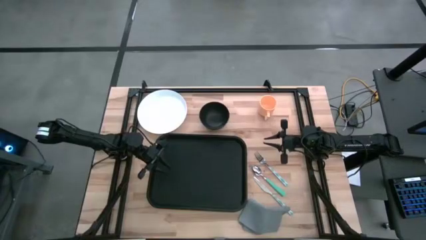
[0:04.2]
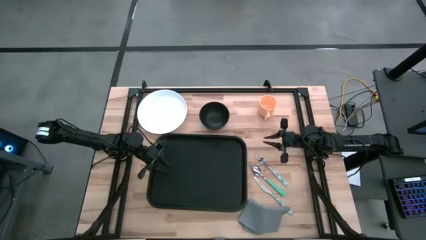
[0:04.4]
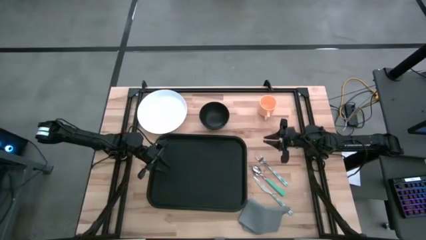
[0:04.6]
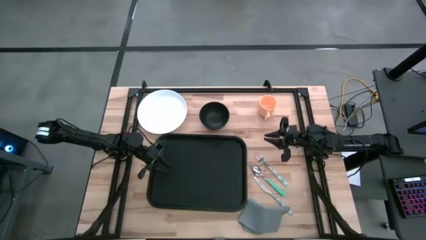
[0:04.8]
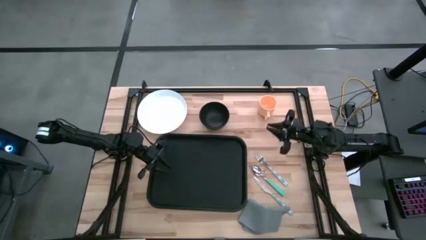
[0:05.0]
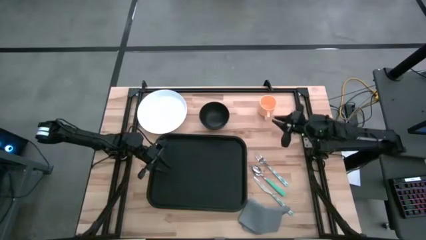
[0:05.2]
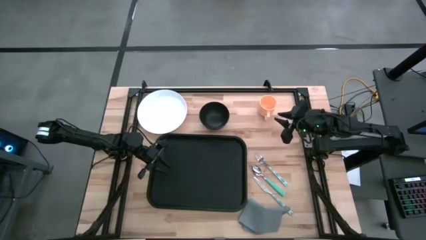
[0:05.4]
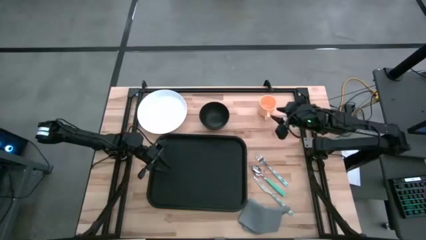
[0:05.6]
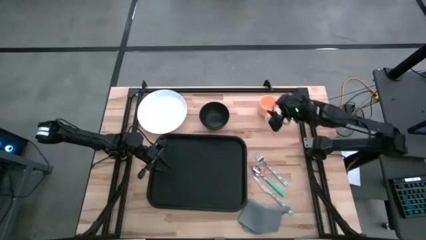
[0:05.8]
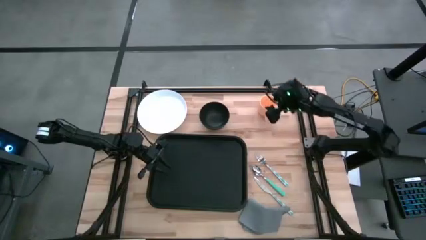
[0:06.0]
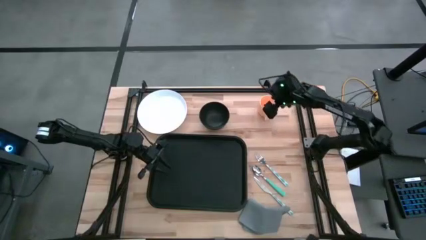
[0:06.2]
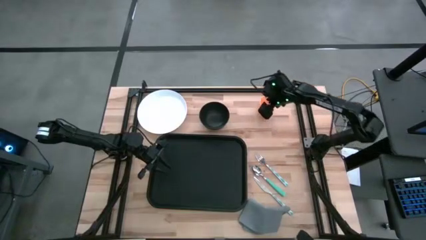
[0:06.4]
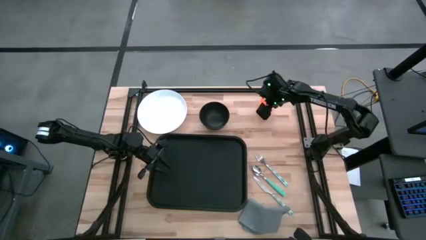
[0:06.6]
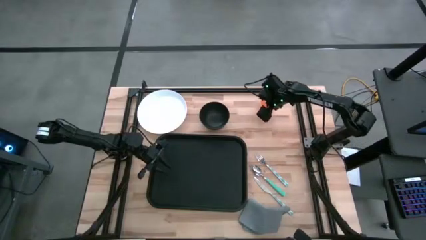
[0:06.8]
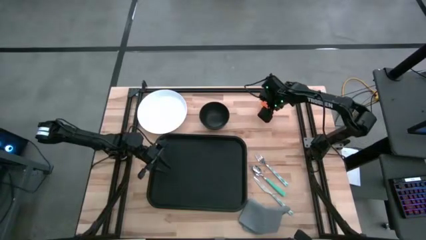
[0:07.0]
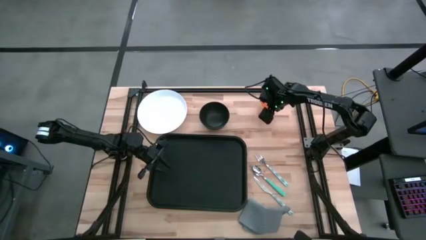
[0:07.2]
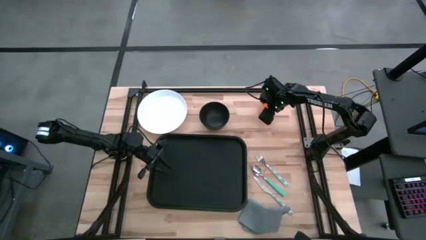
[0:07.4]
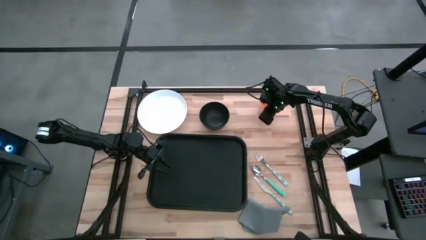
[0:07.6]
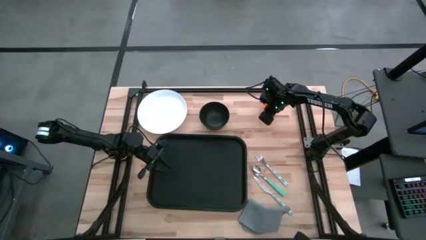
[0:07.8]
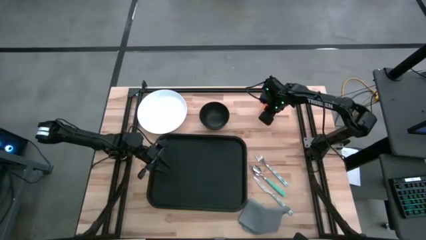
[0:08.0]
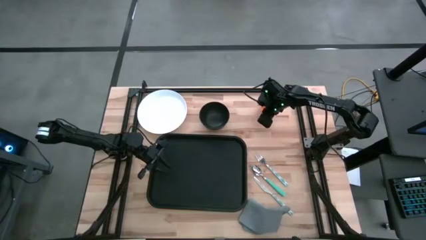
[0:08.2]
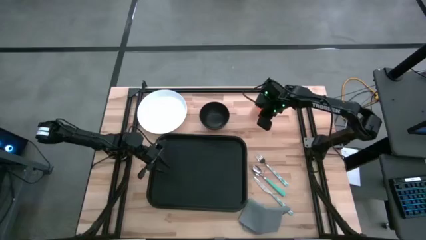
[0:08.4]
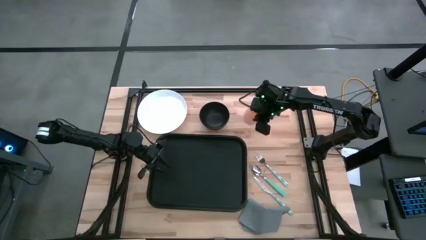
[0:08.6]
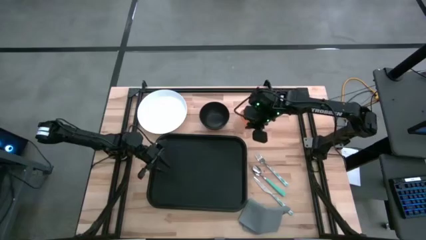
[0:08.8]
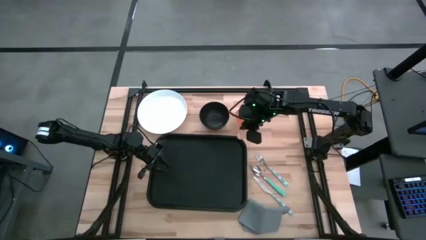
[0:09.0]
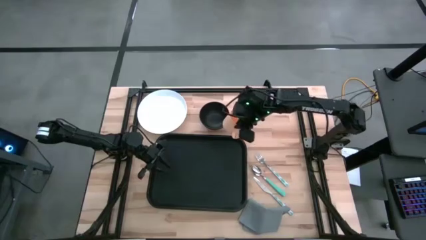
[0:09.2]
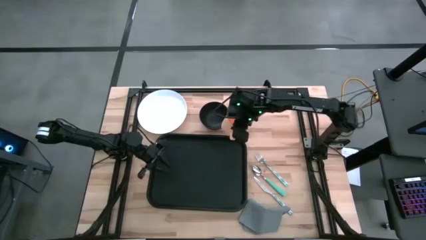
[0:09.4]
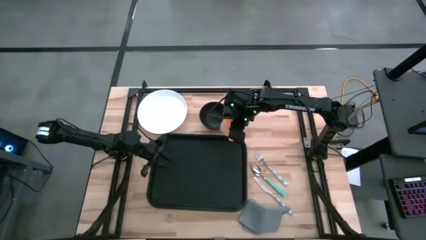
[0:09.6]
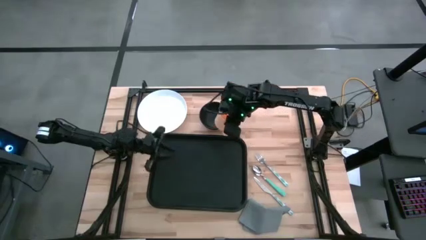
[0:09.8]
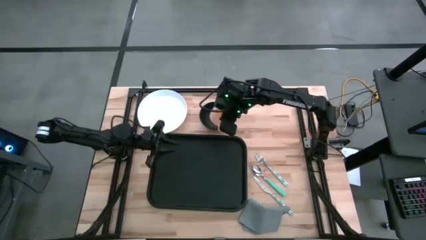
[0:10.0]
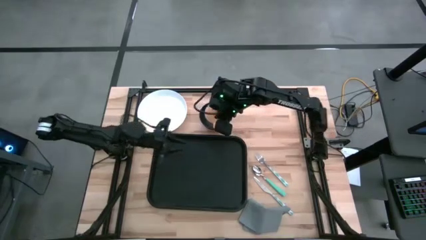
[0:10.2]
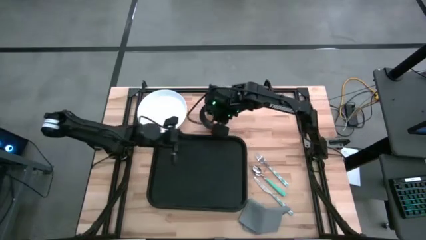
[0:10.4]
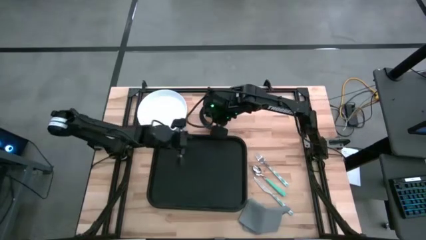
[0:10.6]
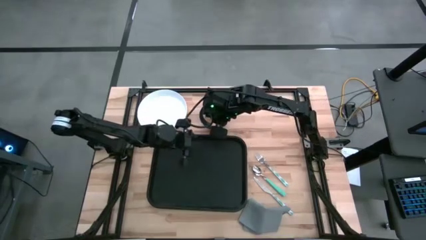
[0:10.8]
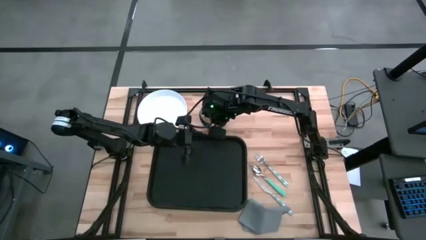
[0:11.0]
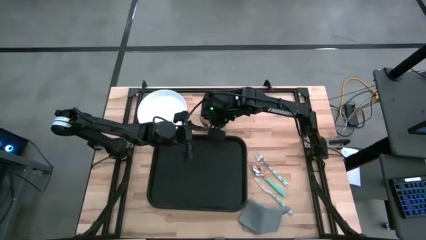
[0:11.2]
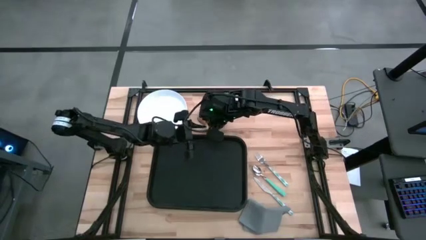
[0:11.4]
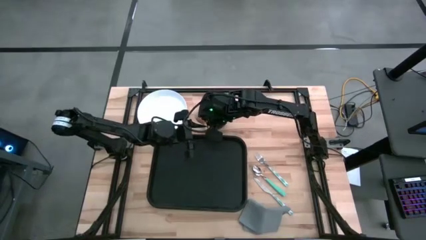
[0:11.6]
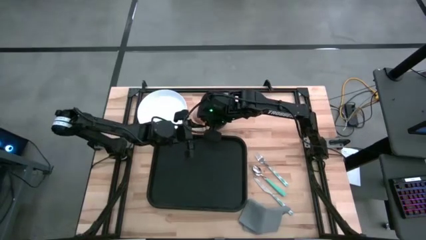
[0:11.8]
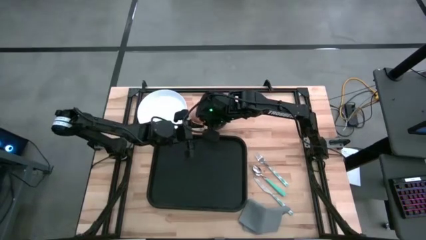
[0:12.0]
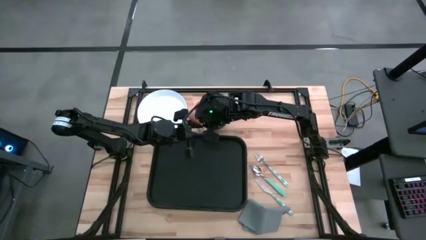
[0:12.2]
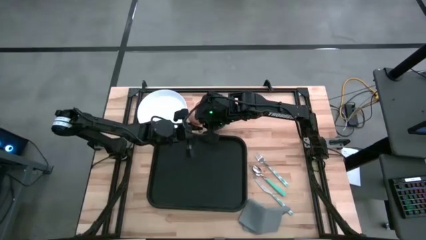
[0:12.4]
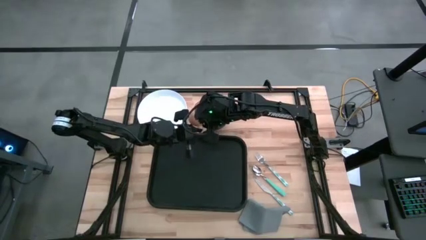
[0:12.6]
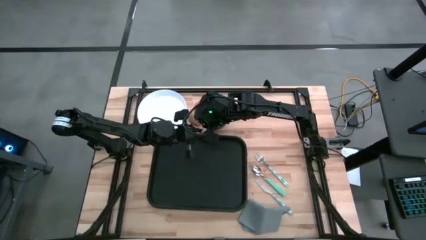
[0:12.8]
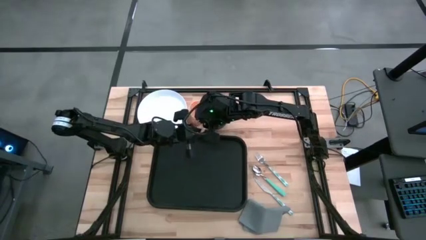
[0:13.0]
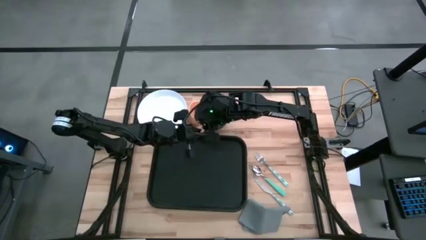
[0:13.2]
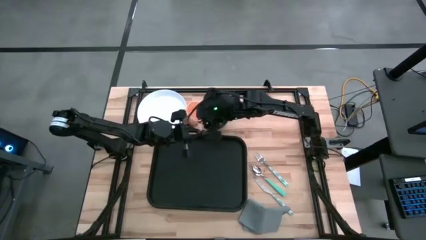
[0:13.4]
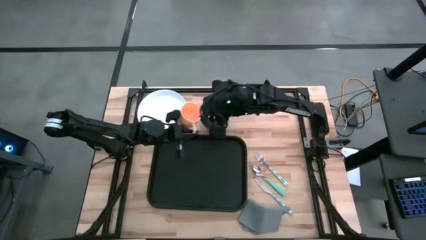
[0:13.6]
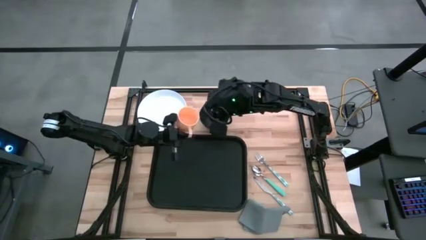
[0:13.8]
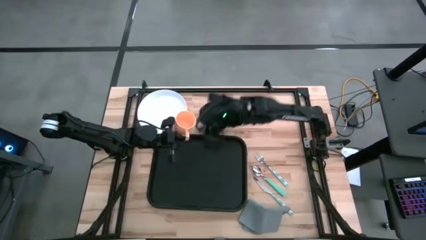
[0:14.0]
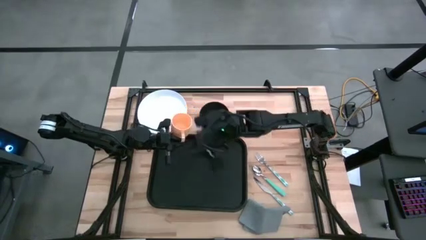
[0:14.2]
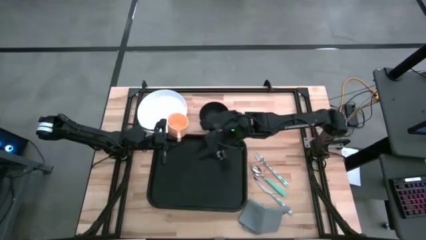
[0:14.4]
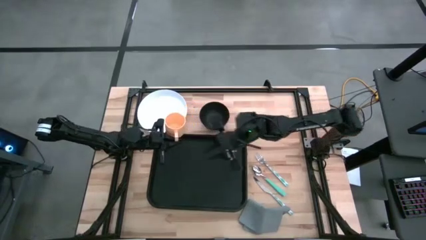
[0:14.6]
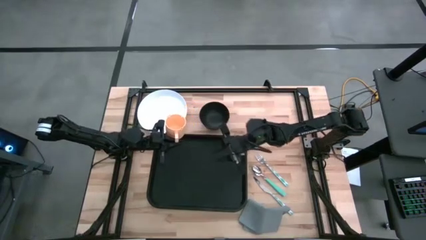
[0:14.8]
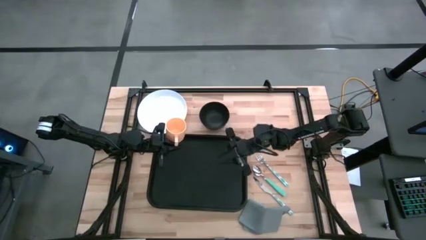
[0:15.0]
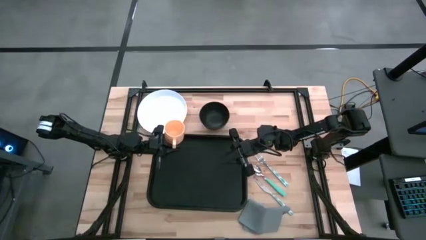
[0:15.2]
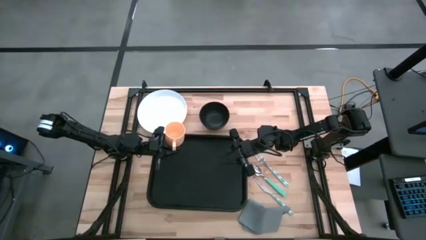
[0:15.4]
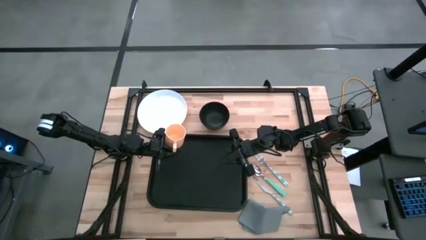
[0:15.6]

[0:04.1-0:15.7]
Task: Set up tray
Put the yellow mug on the black serving tray
